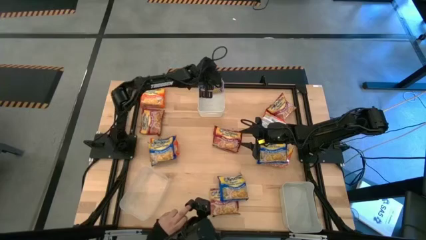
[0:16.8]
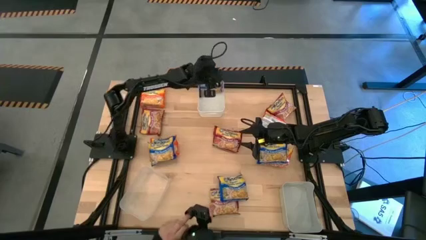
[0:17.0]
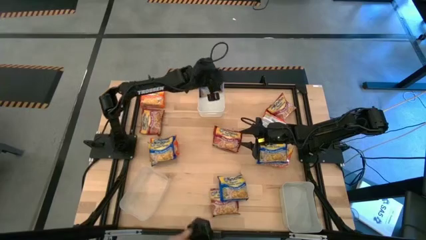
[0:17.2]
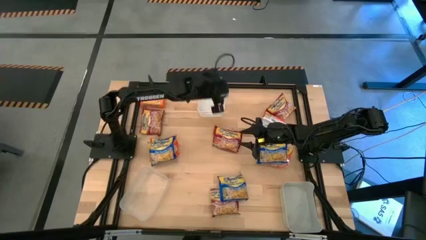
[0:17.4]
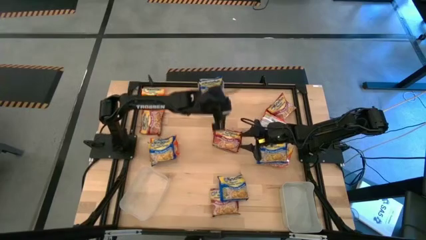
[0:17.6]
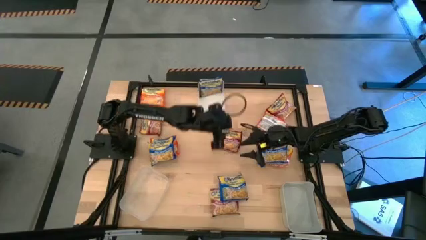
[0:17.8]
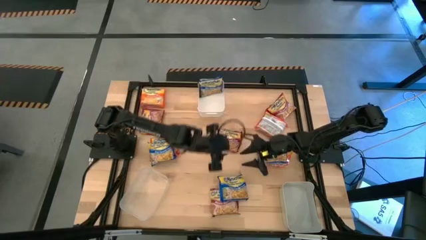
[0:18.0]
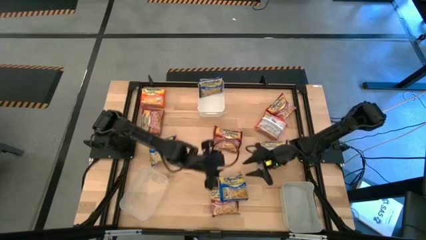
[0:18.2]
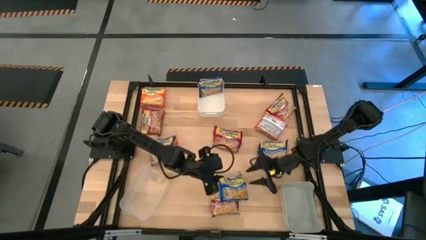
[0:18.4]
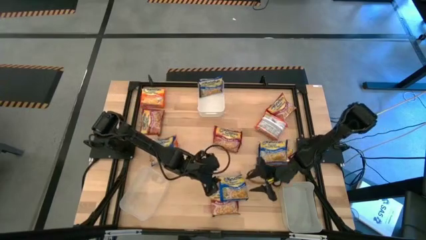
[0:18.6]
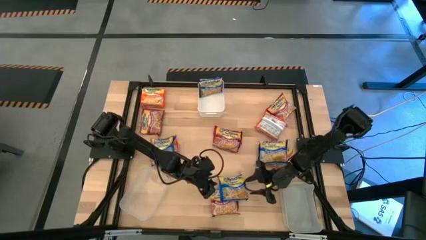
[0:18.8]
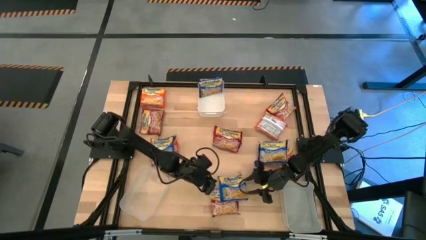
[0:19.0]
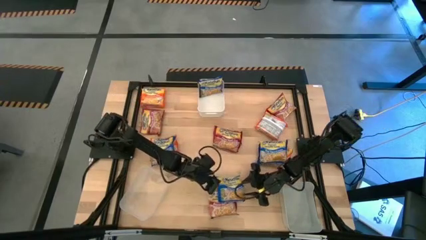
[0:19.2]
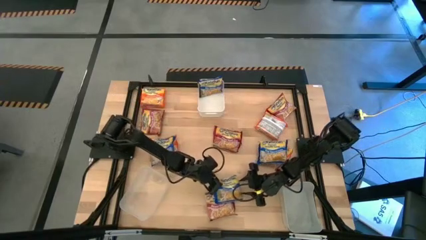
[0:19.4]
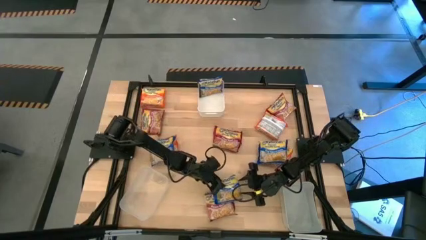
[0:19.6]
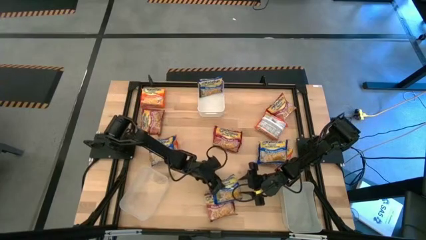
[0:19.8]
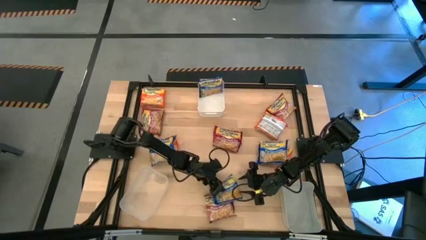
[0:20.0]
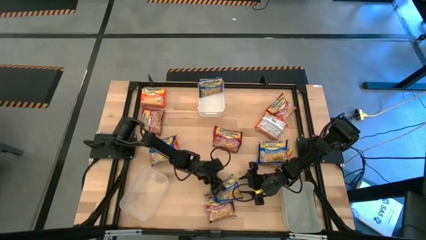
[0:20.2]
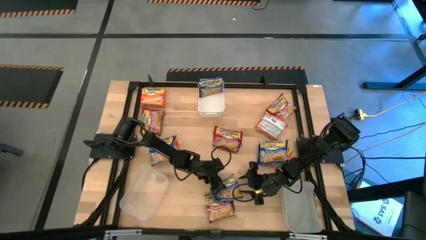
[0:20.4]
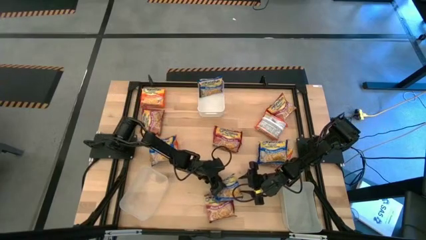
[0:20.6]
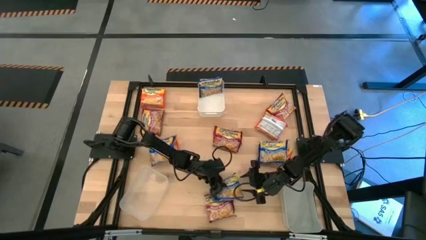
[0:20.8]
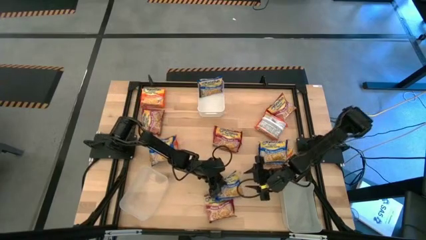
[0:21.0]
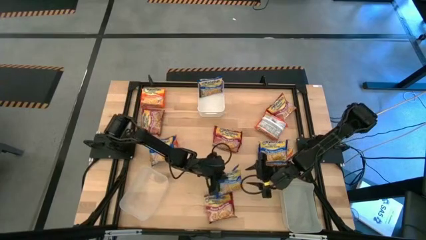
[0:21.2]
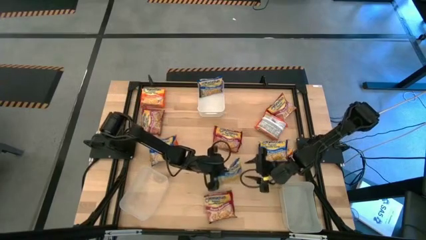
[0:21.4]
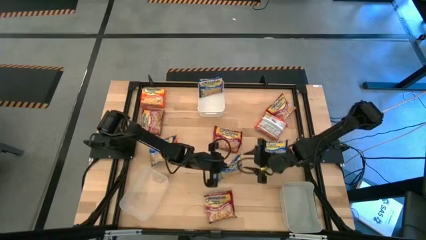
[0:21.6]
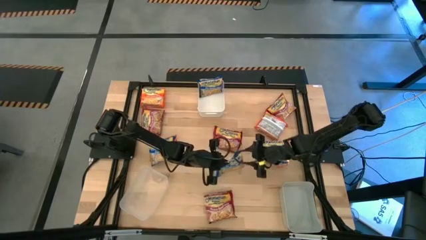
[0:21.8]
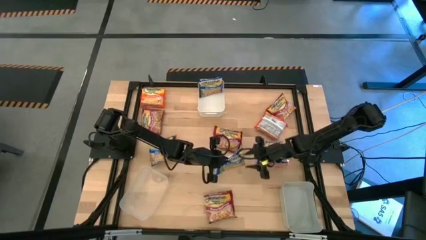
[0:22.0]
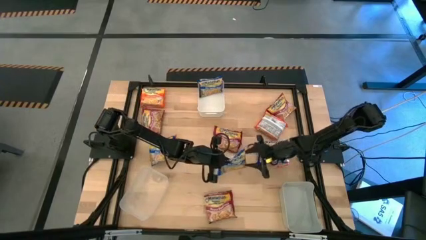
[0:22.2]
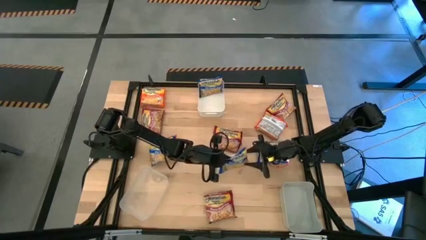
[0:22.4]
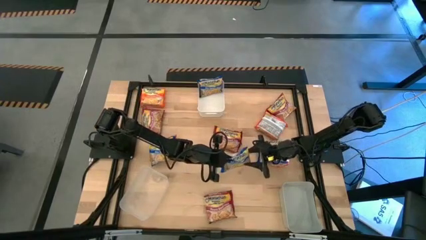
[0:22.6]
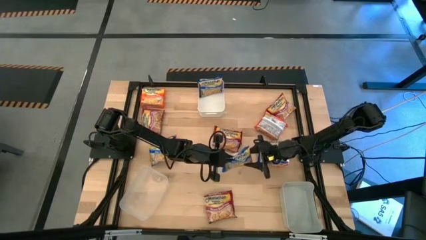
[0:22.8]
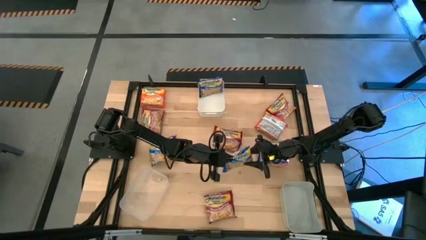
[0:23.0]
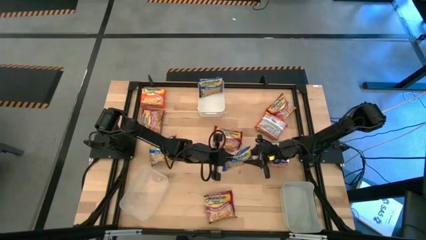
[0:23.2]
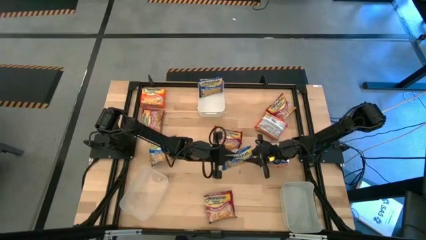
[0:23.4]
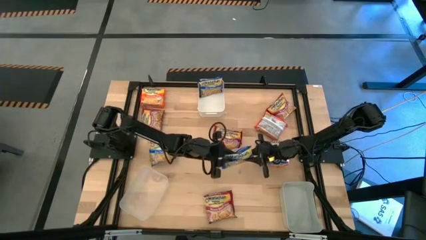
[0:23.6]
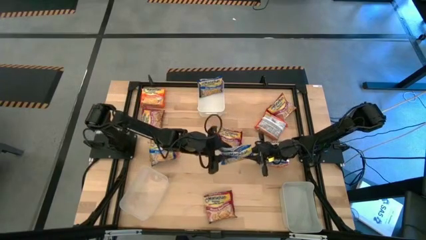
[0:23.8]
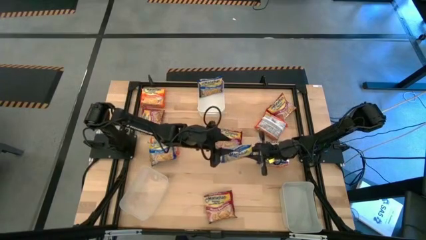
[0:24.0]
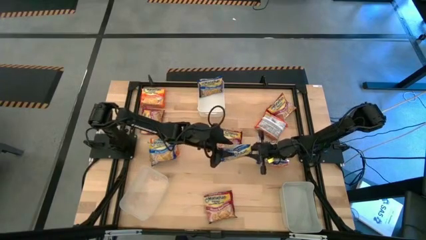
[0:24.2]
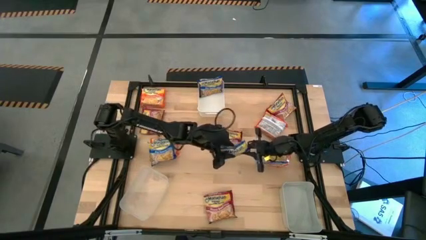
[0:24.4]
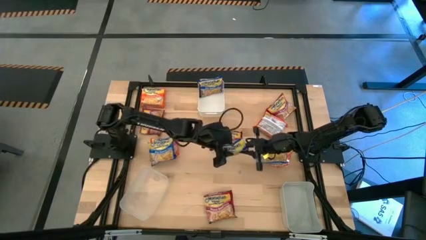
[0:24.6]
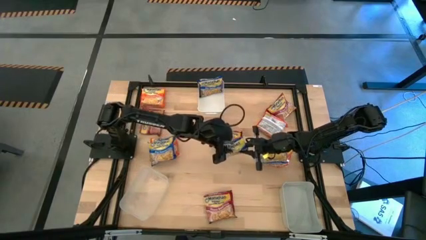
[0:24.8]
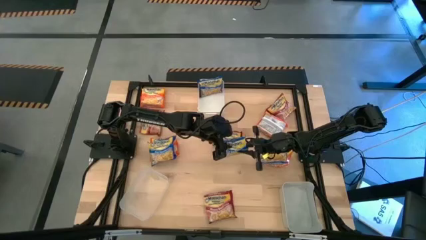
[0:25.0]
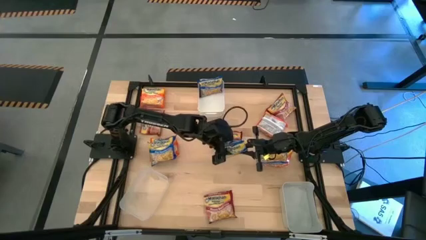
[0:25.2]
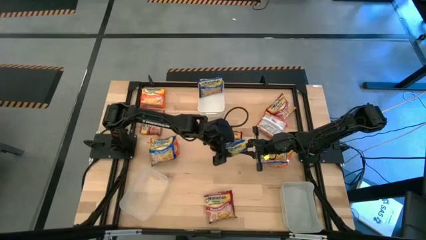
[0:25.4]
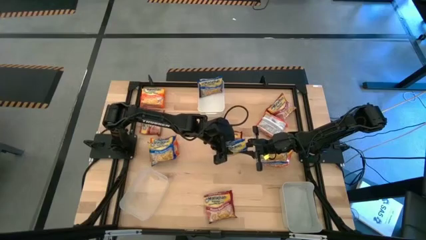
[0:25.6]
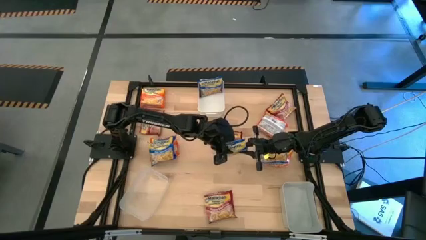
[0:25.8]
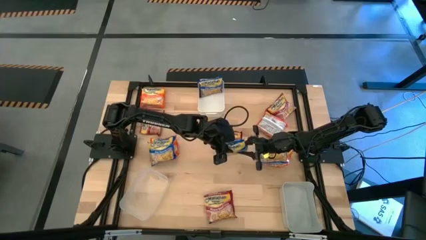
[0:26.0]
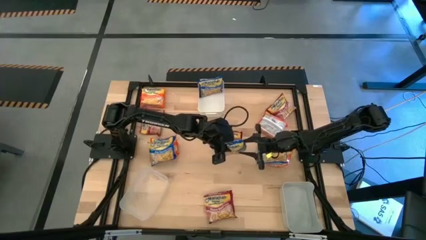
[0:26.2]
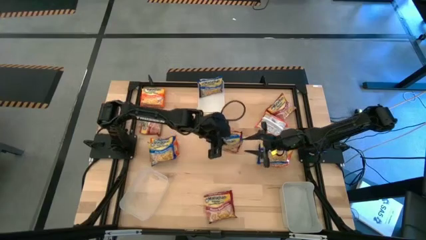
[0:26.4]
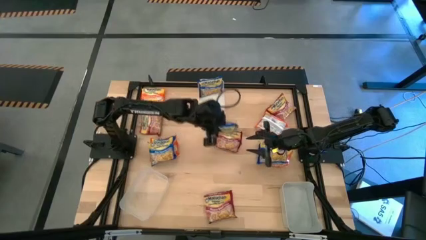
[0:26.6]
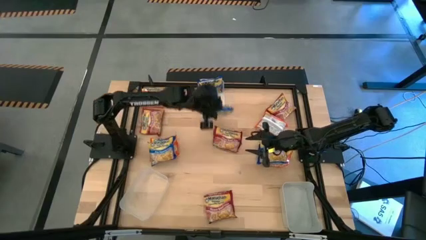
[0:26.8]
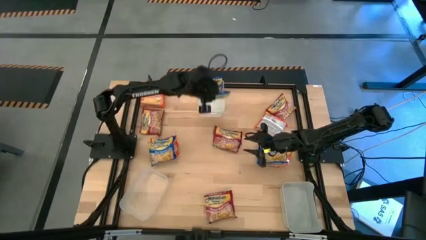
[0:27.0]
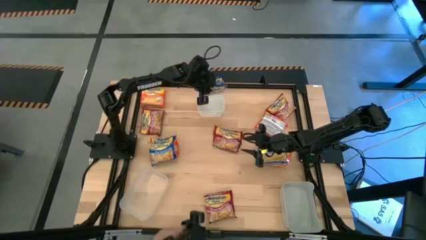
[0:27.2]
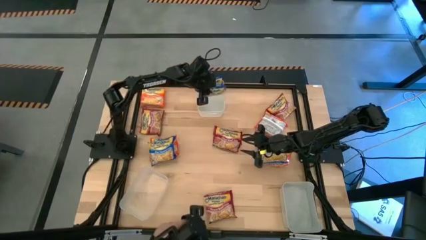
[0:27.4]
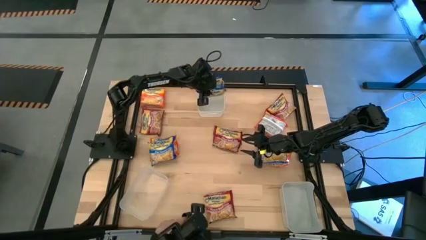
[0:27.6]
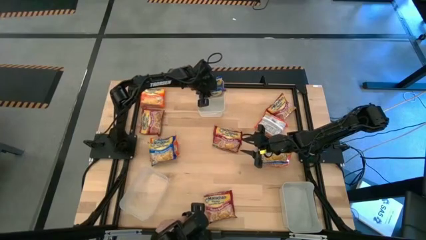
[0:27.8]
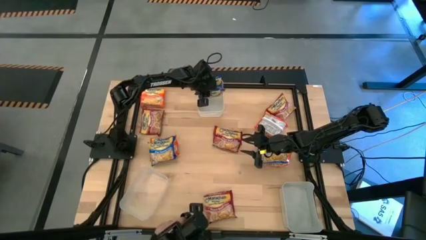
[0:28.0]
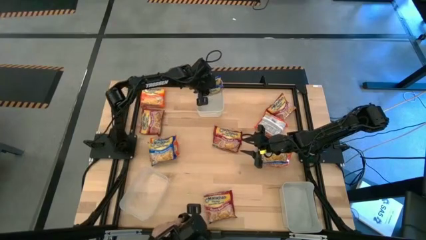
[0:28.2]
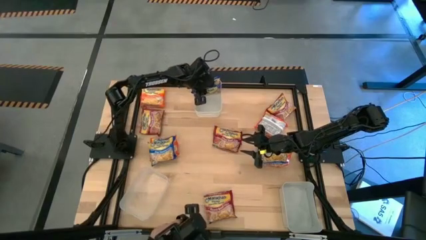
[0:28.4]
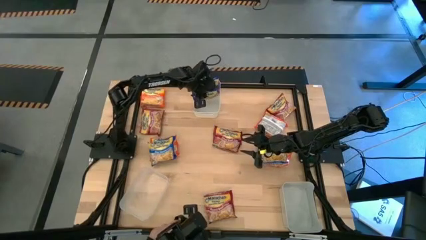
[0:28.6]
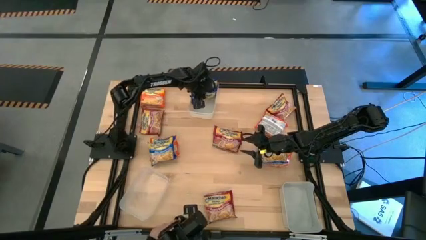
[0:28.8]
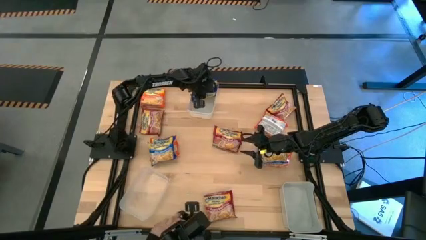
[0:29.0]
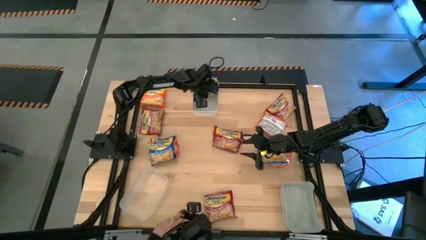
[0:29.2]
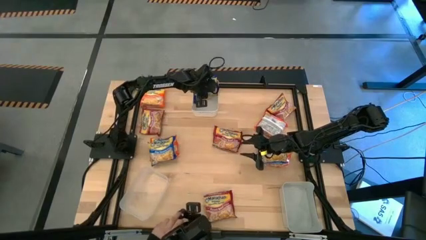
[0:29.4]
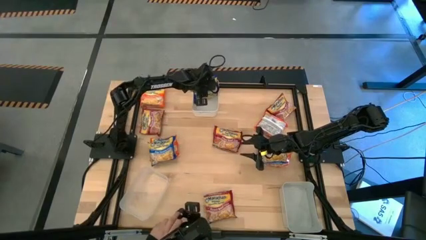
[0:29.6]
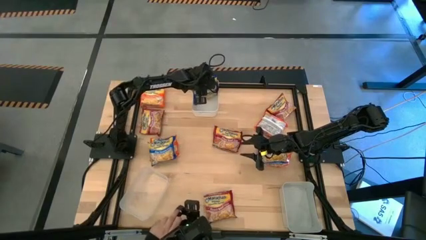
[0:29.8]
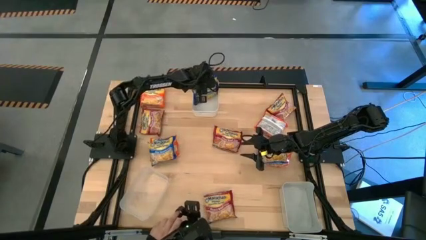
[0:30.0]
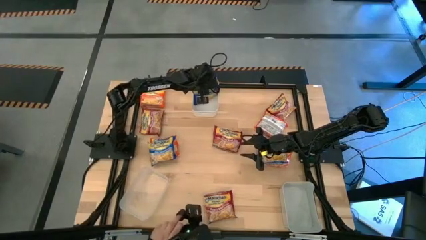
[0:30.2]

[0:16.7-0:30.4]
Task: Sort Maruchan noodles
Put the blue noodle pack into the white bin
